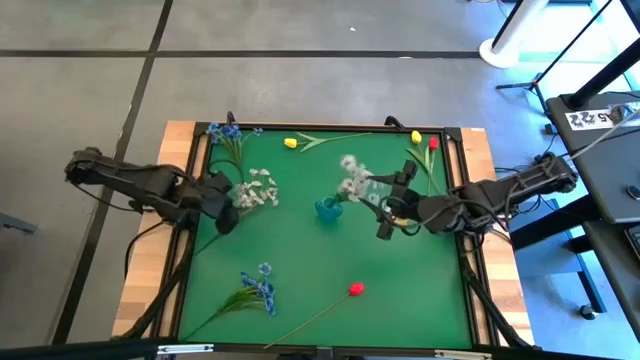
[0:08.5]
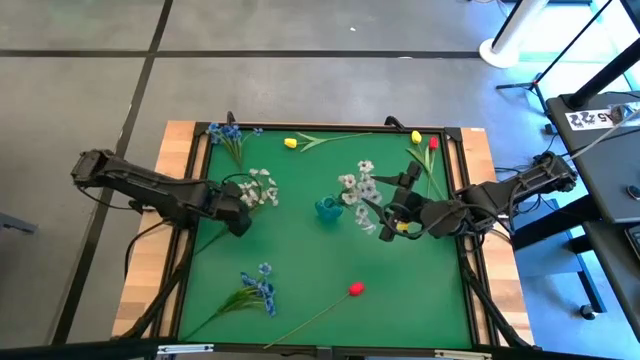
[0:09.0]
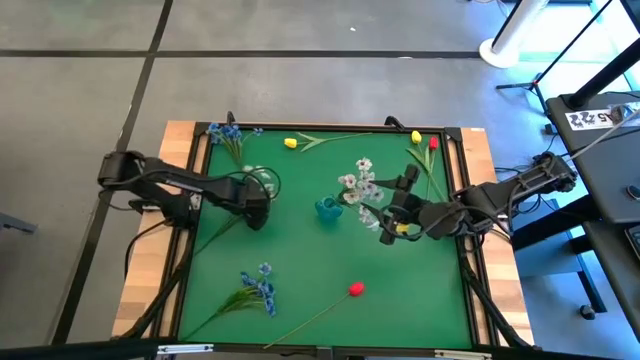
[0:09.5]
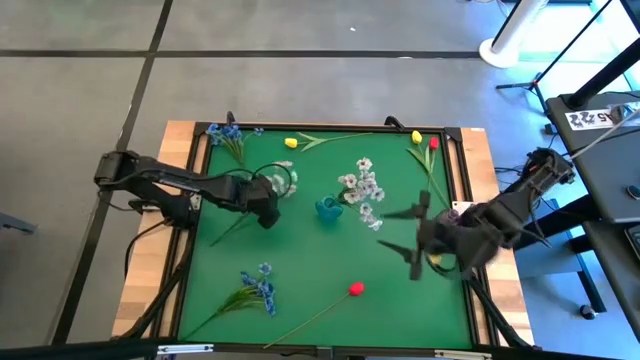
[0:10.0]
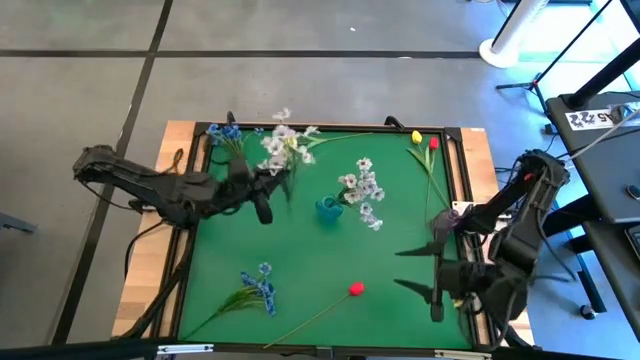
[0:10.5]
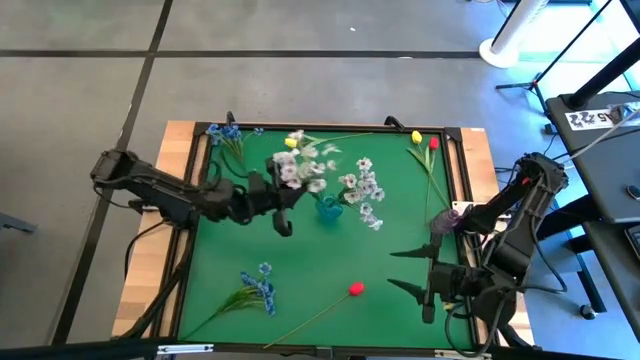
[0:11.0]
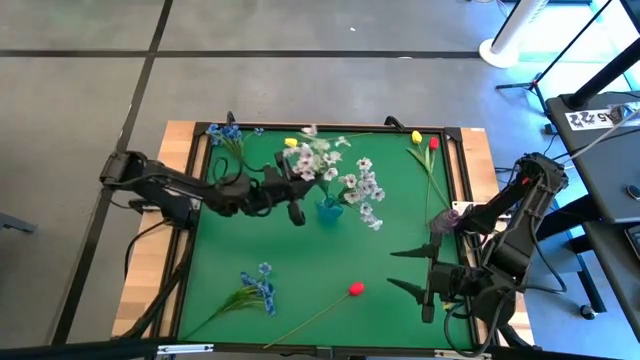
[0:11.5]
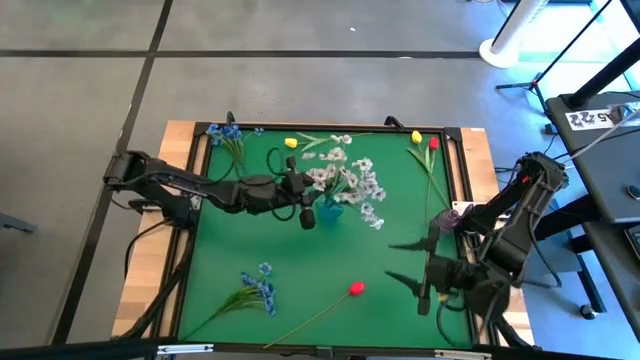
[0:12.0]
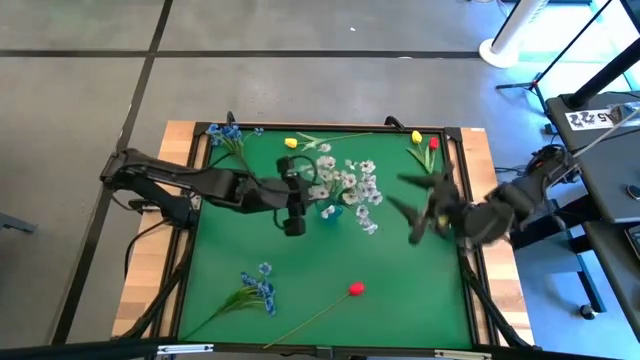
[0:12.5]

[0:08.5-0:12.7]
Task: Sort flowers into vase by color
Put the white flowers into the blue vase

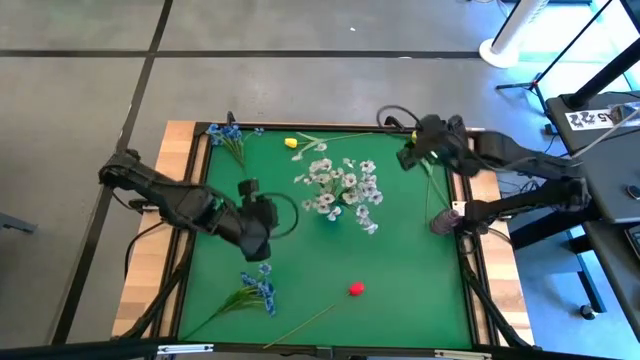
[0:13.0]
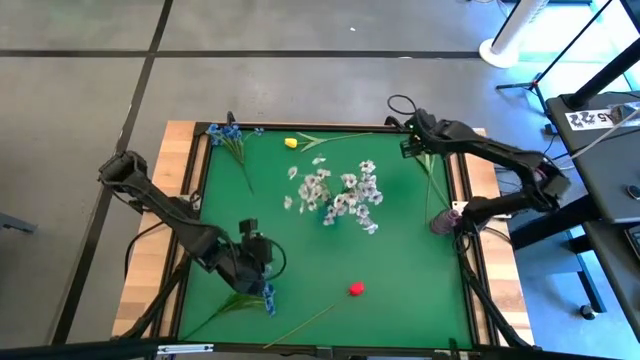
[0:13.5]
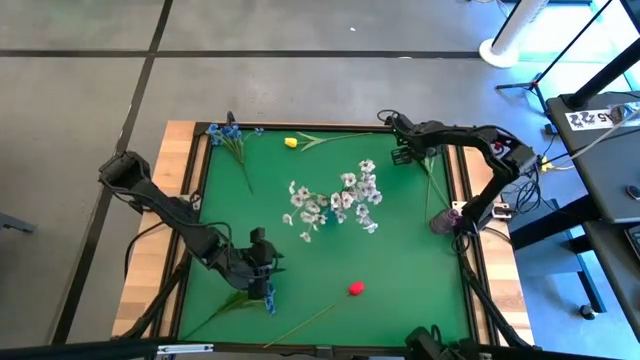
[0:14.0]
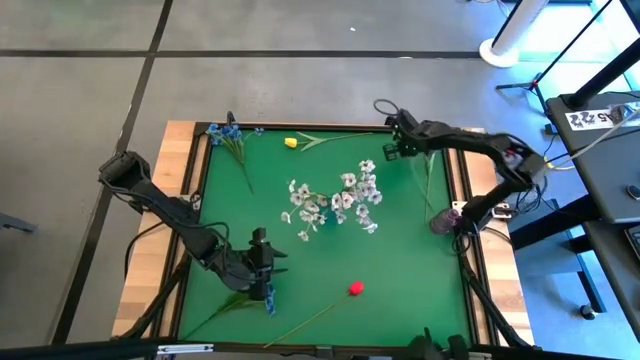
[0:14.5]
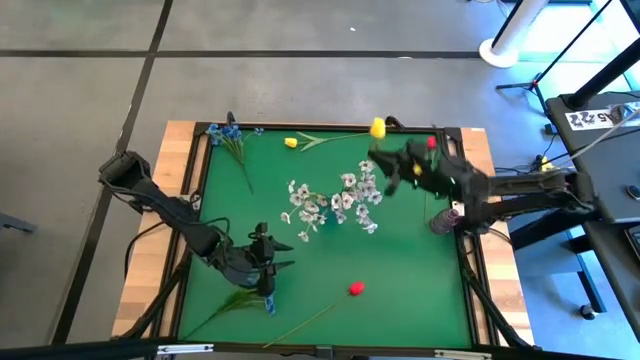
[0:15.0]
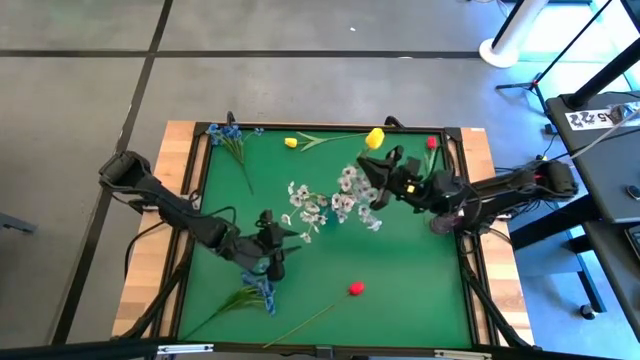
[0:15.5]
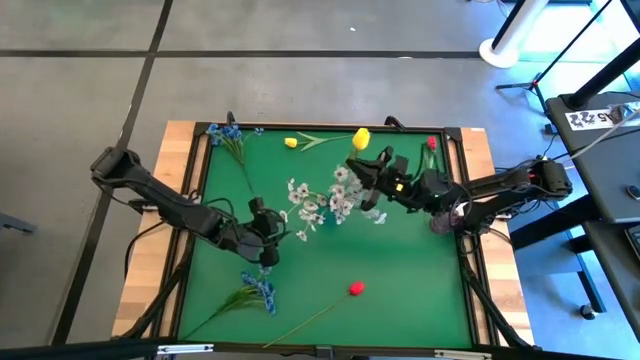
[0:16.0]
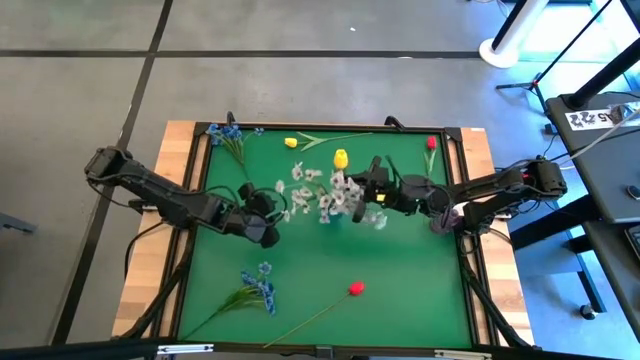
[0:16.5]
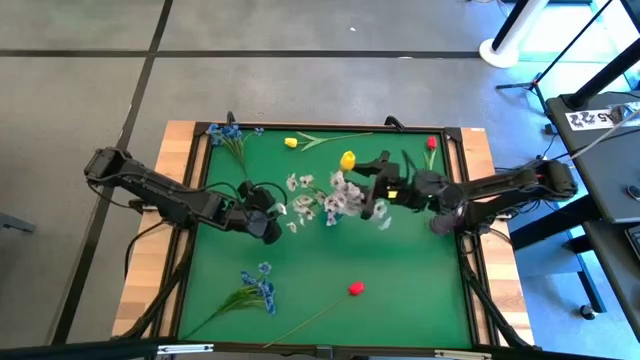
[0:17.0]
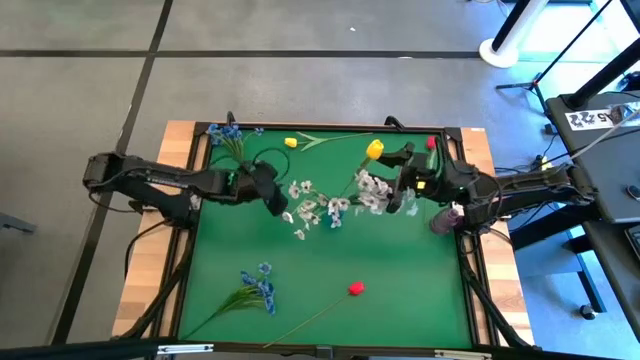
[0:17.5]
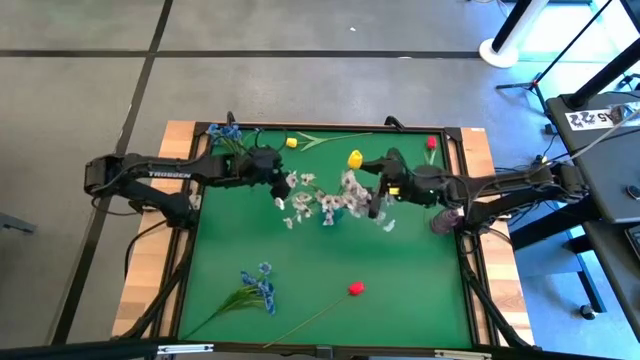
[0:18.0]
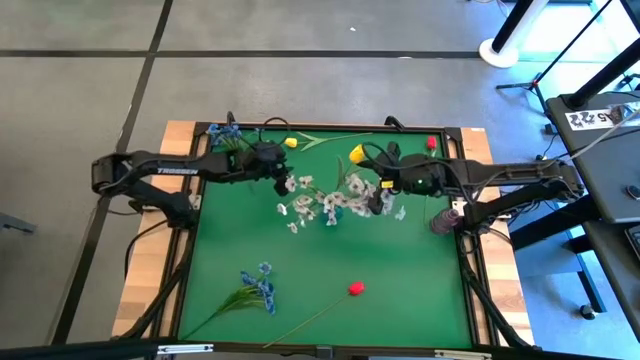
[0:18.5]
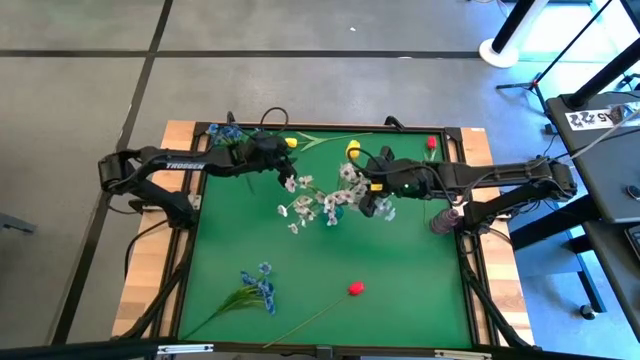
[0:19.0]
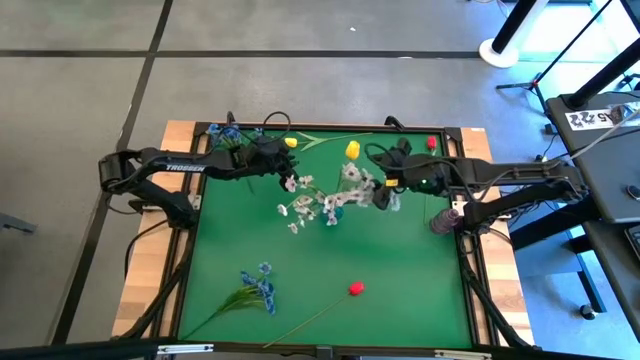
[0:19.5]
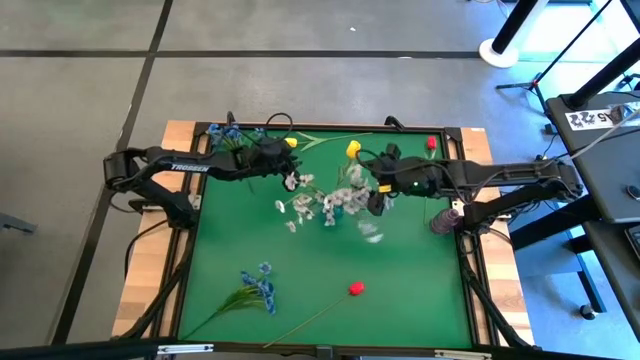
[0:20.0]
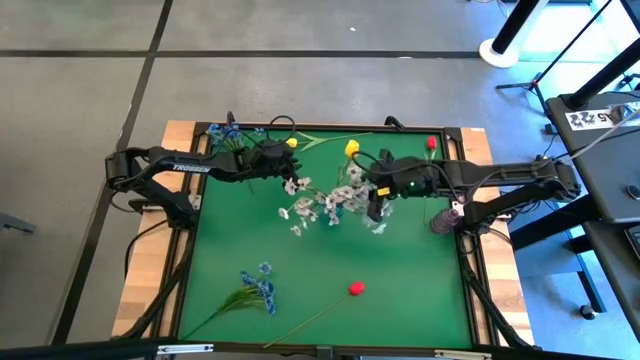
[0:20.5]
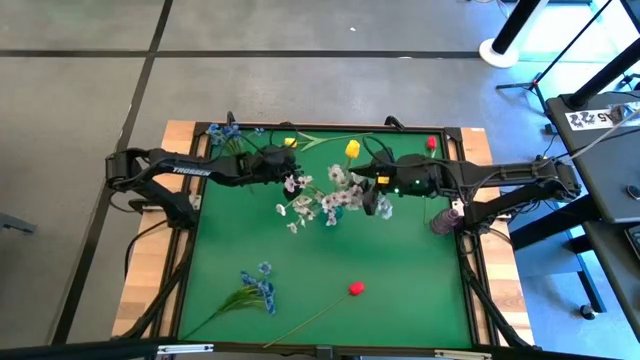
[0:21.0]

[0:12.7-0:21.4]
Put the right yellow tulip into the blue vase

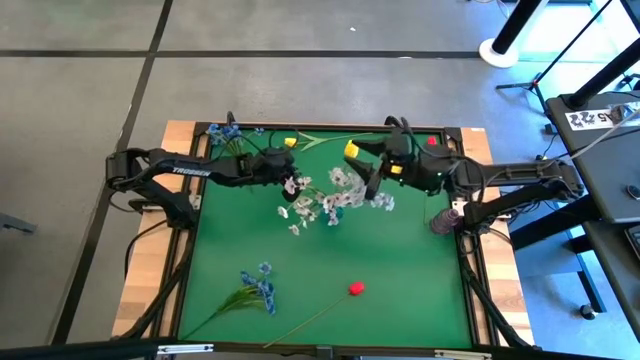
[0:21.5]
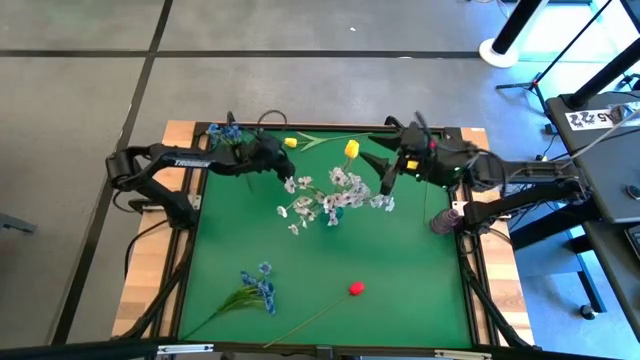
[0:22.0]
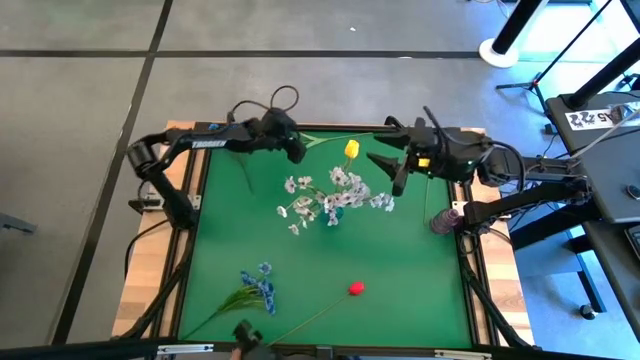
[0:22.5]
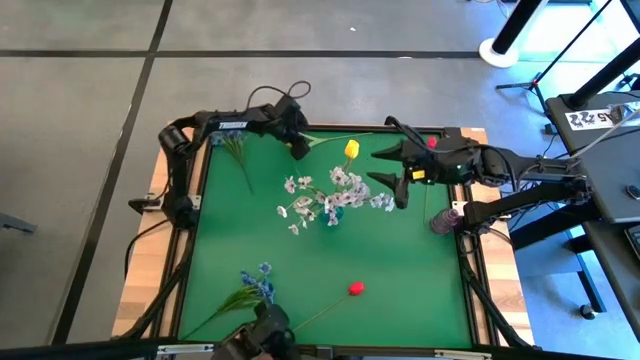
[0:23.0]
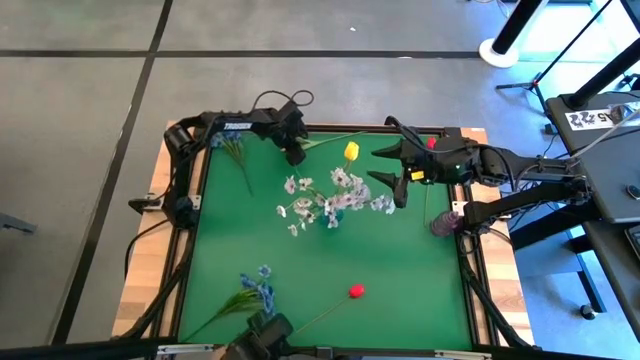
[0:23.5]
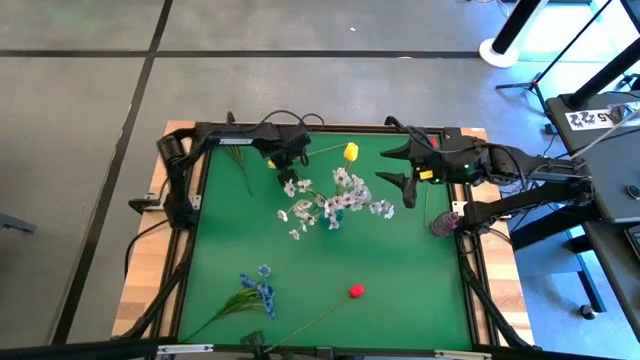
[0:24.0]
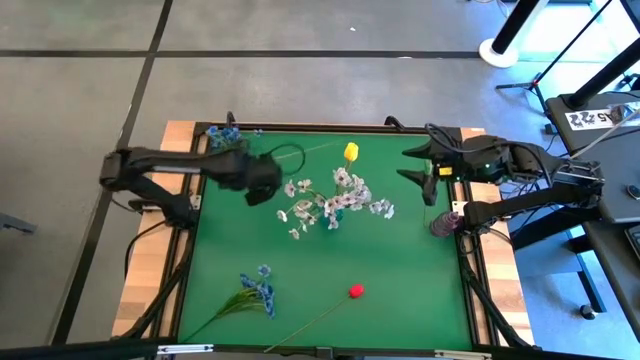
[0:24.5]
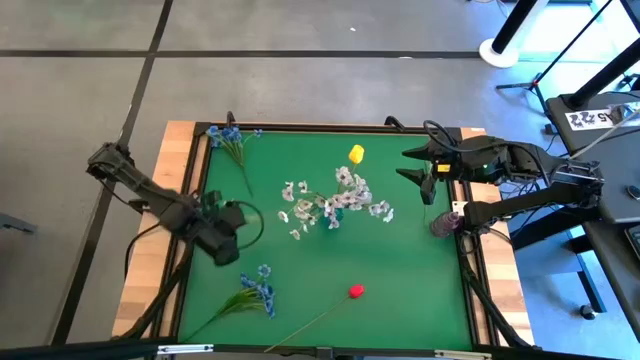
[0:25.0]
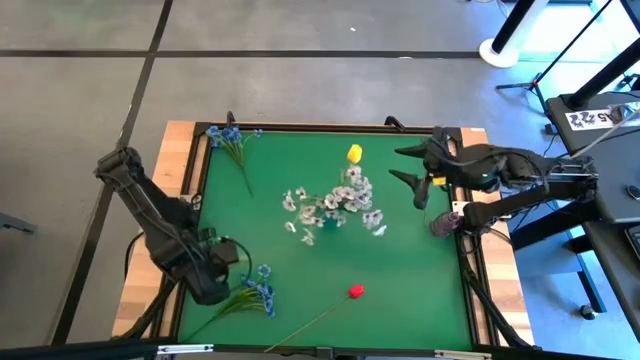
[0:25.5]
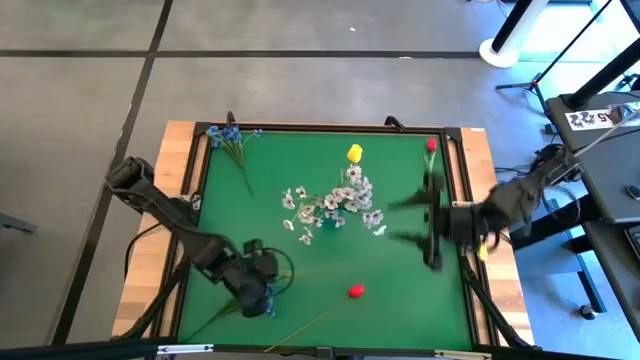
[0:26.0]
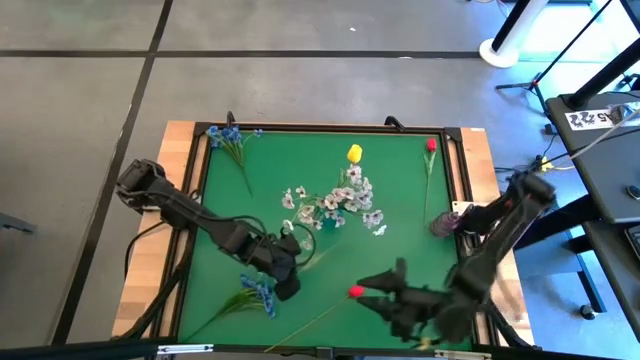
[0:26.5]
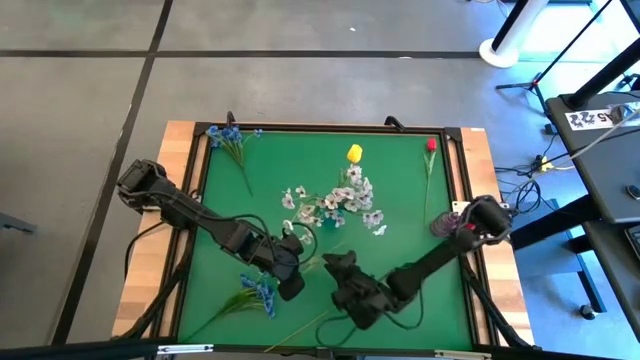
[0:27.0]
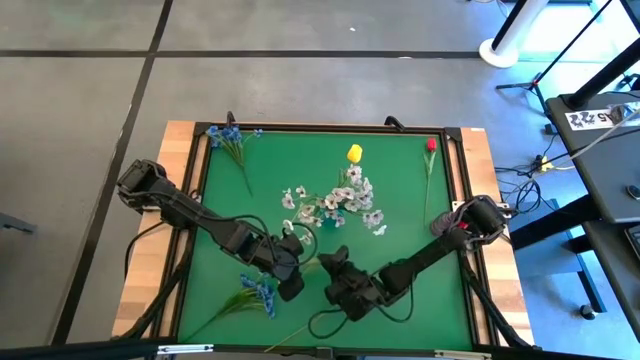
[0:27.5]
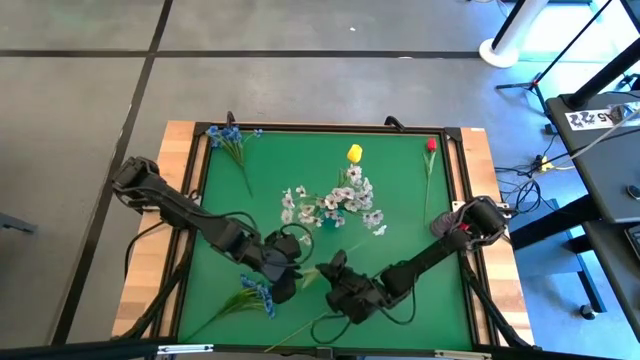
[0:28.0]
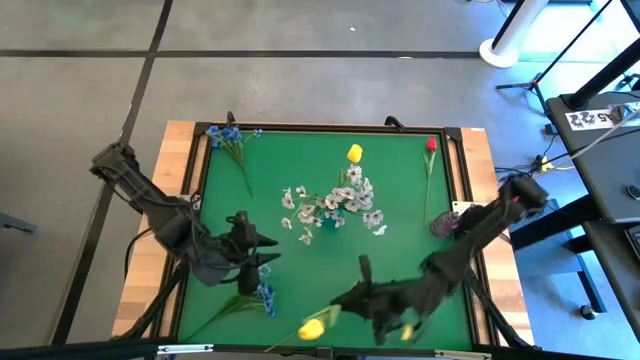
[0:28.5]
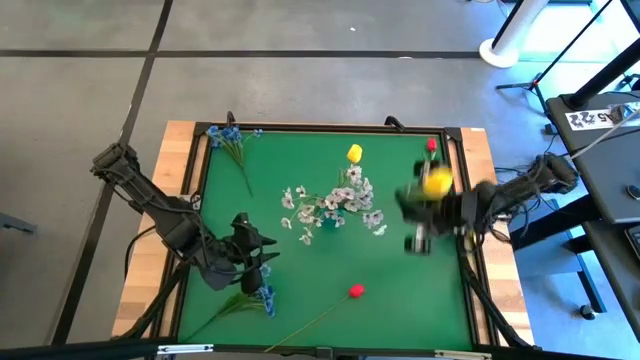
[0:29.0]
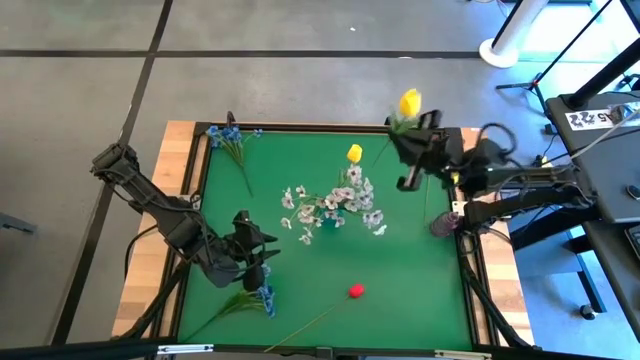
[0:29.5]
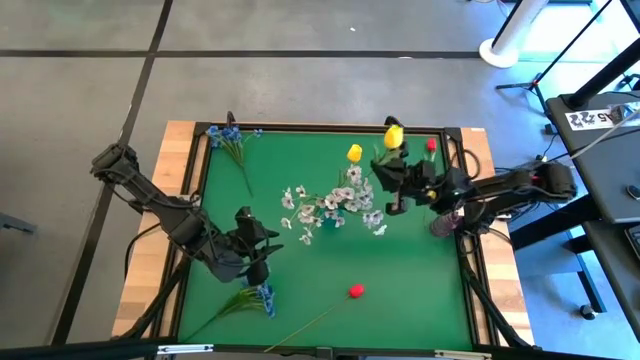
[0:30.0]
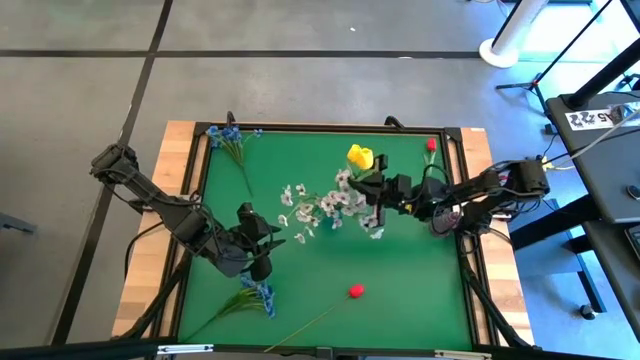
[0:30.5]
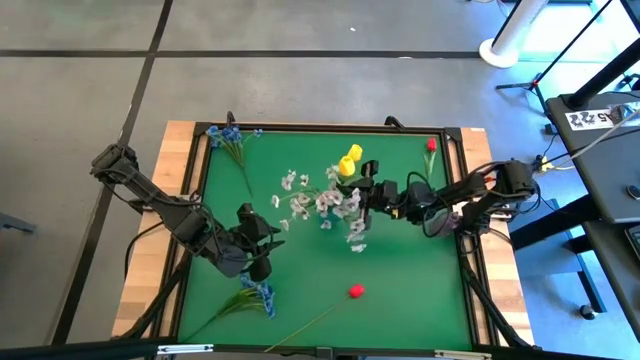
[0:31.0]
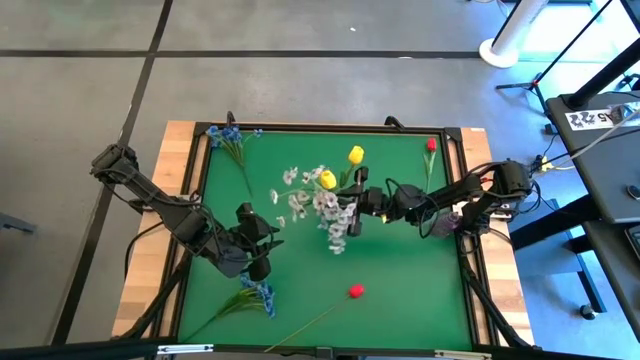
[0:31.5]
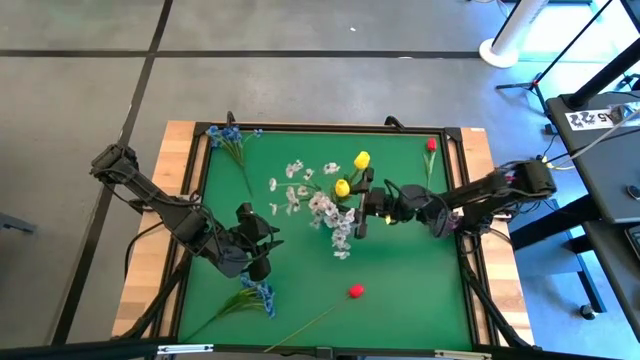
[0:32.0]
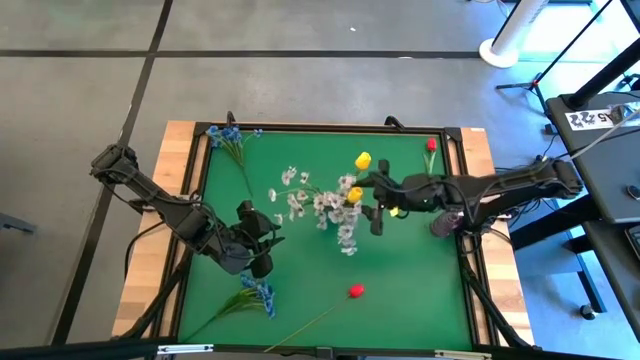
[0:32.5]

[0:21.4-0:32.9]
Put the yellow tulip into the blue vase
